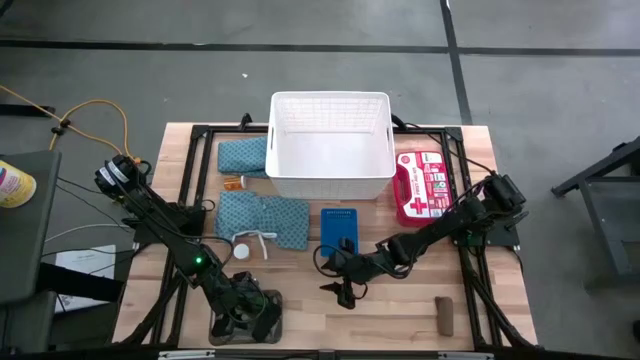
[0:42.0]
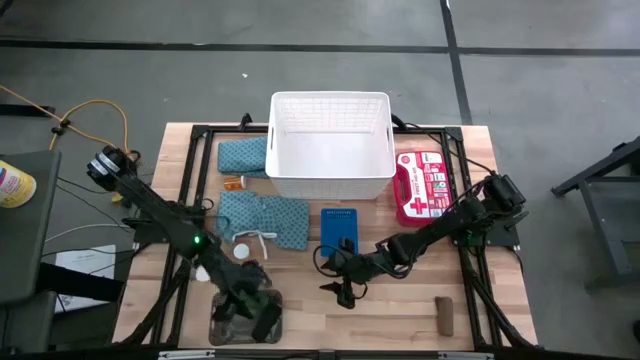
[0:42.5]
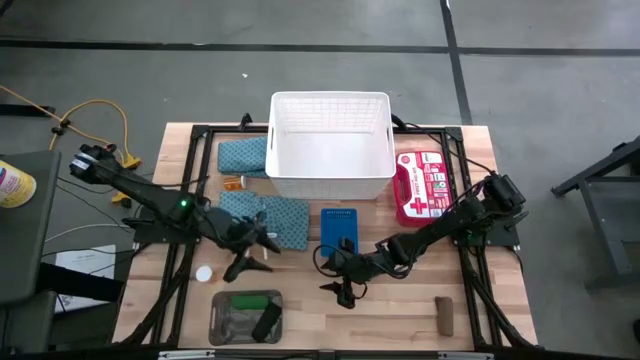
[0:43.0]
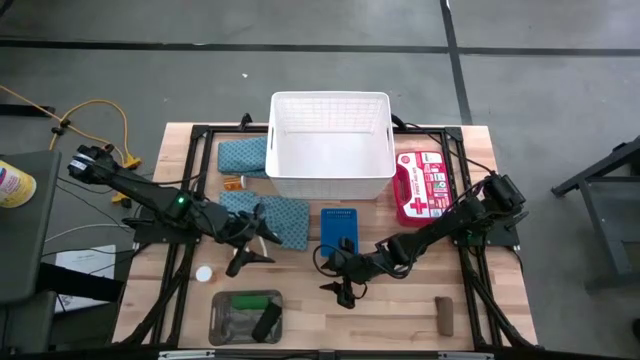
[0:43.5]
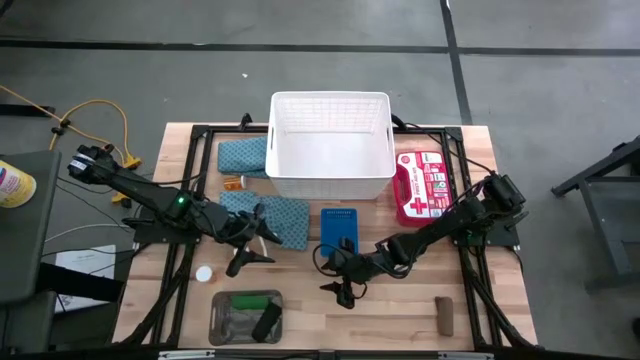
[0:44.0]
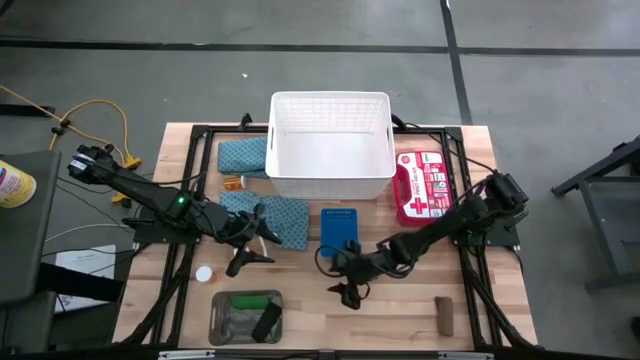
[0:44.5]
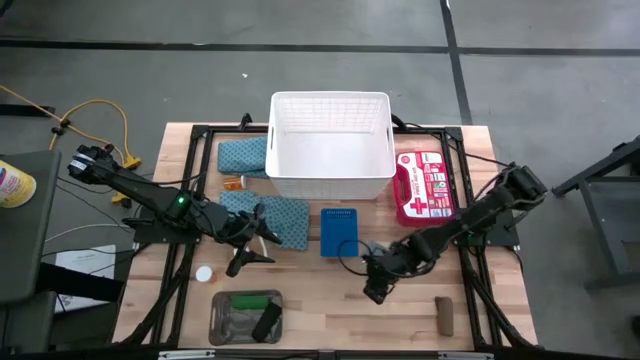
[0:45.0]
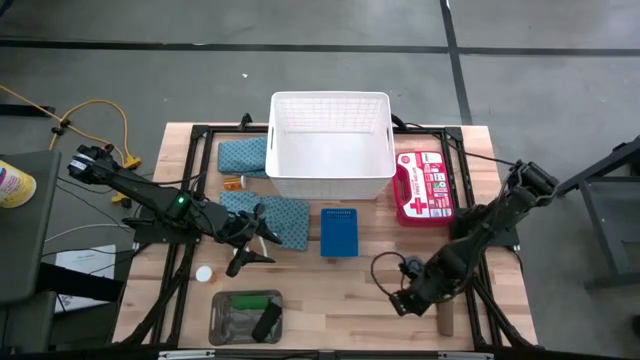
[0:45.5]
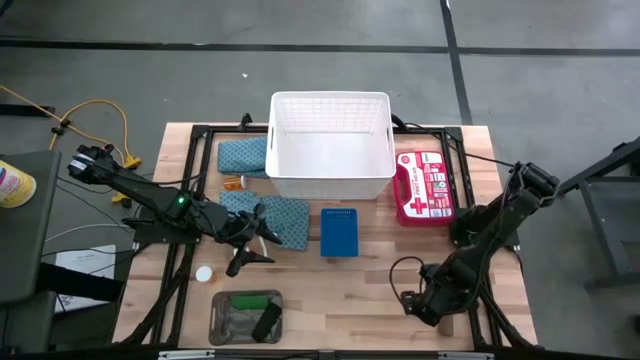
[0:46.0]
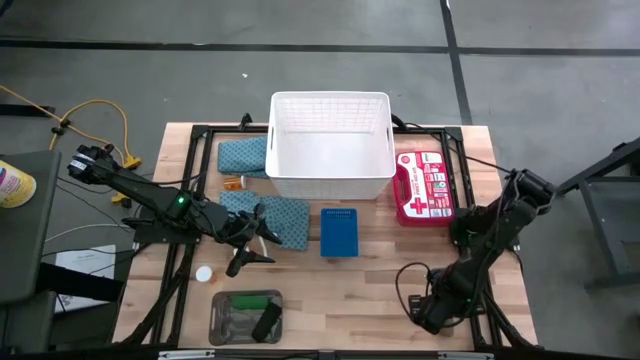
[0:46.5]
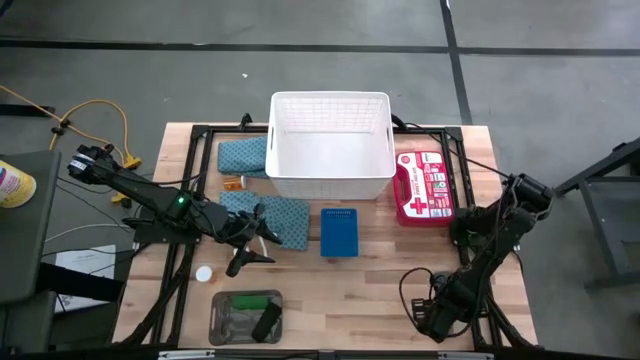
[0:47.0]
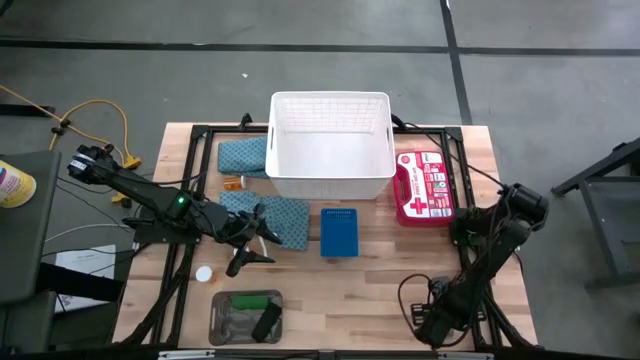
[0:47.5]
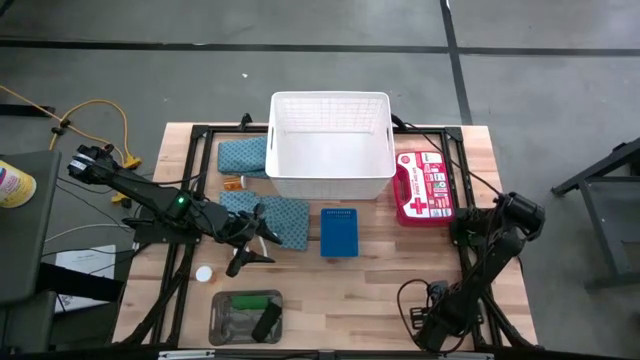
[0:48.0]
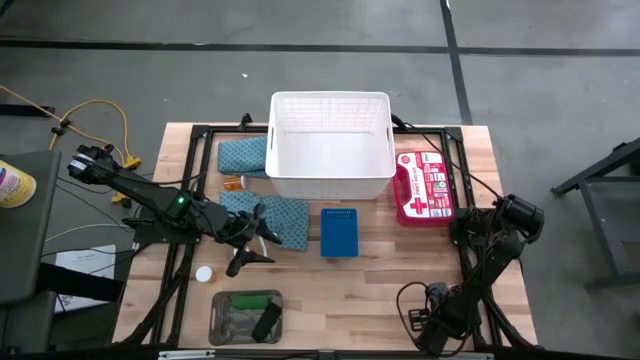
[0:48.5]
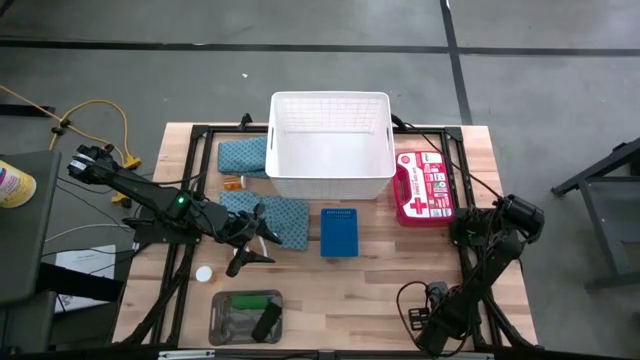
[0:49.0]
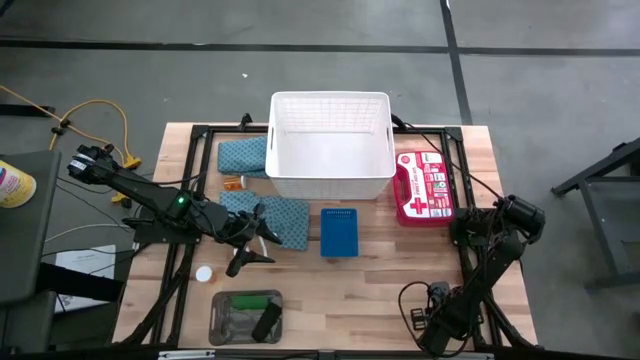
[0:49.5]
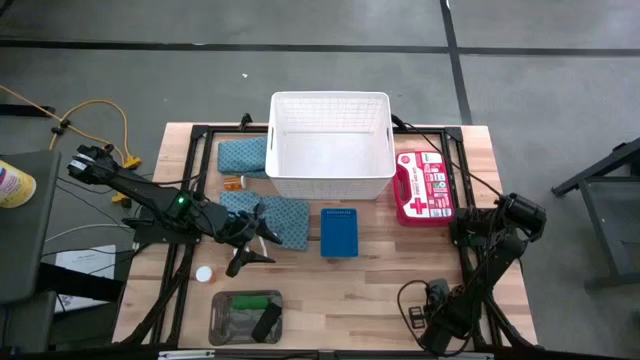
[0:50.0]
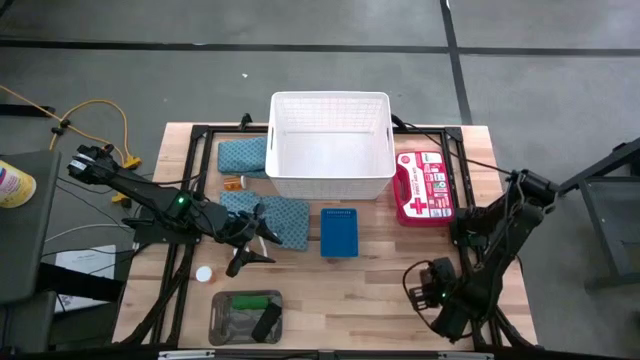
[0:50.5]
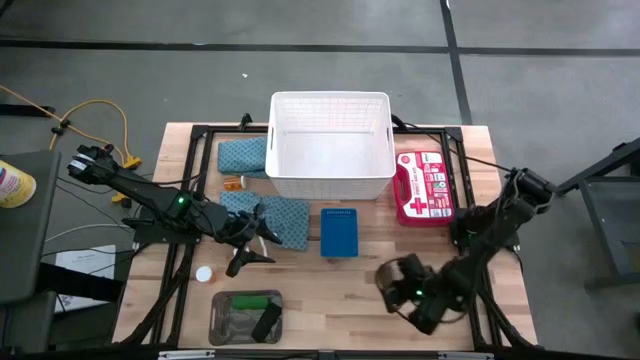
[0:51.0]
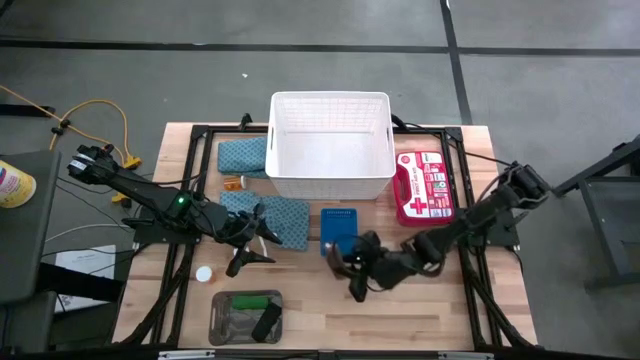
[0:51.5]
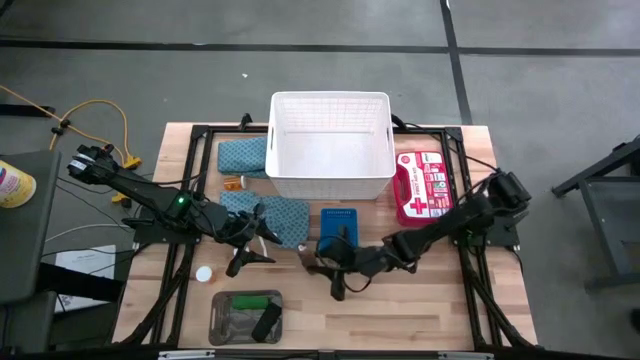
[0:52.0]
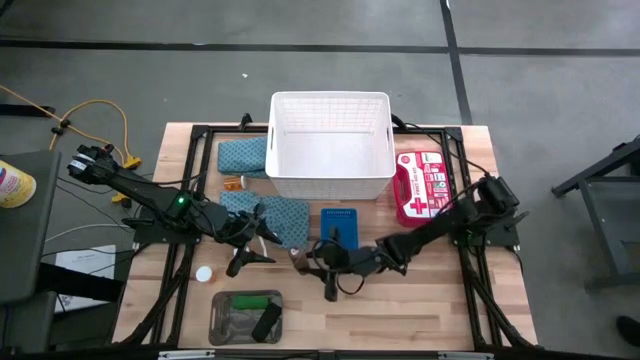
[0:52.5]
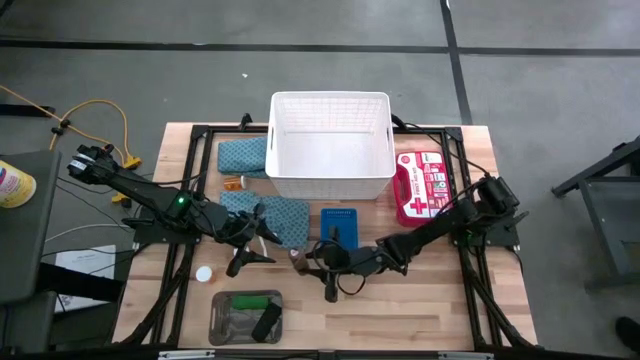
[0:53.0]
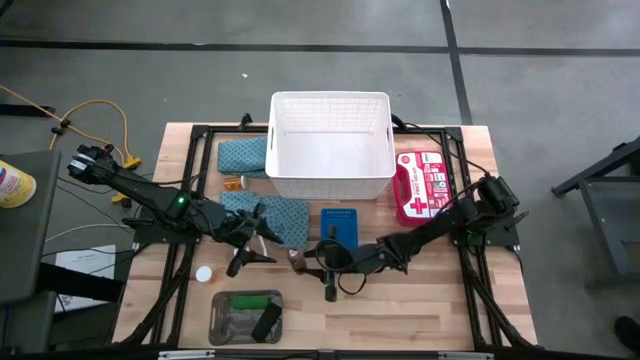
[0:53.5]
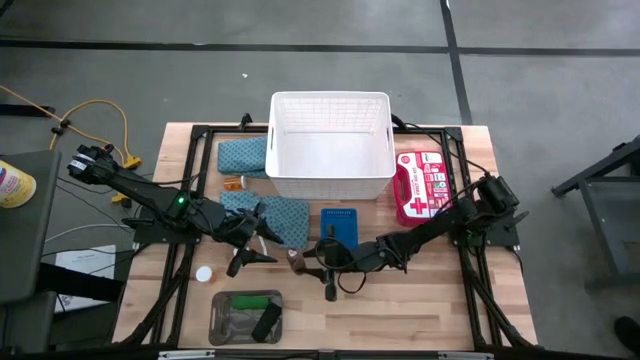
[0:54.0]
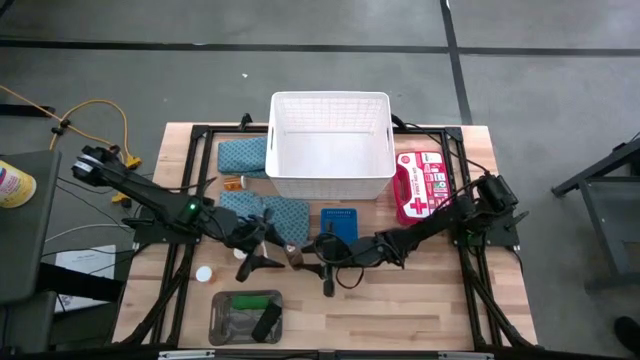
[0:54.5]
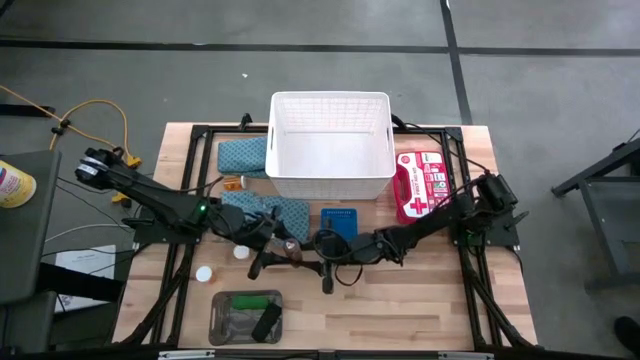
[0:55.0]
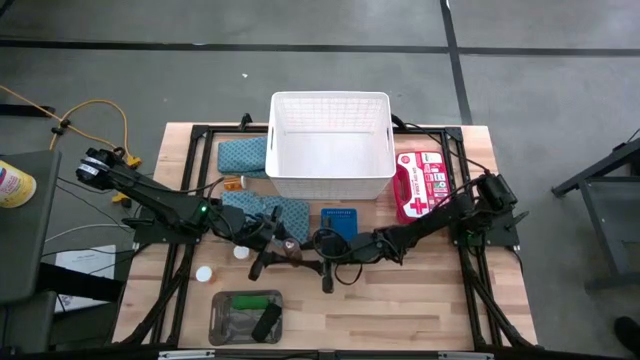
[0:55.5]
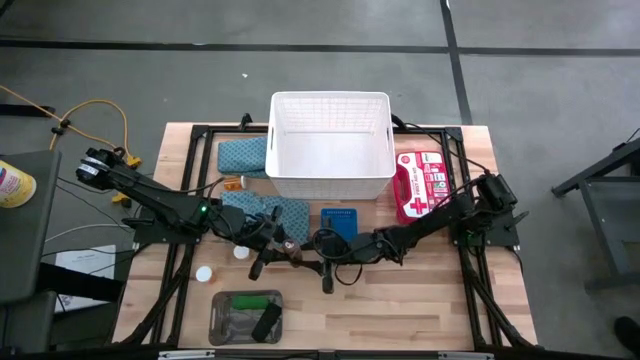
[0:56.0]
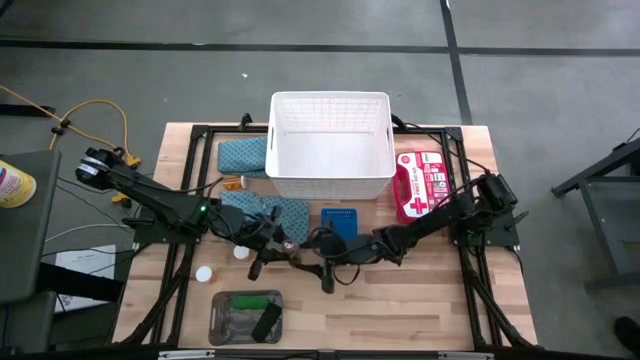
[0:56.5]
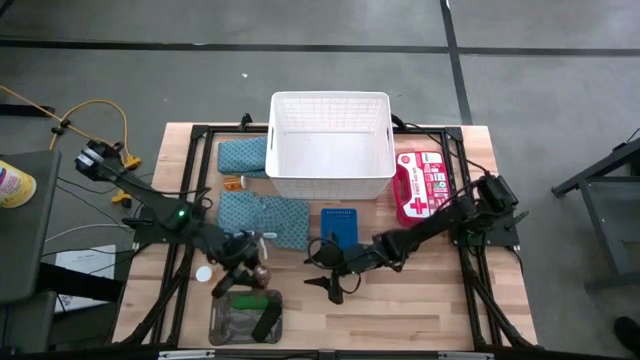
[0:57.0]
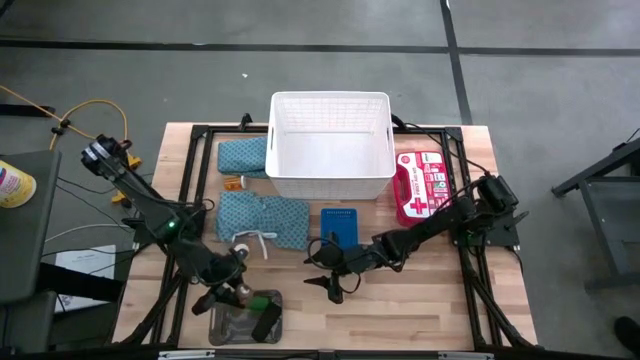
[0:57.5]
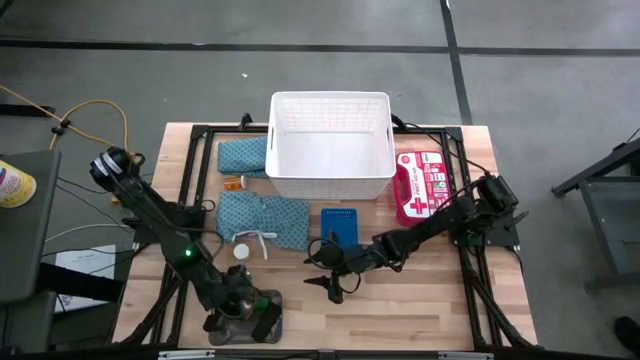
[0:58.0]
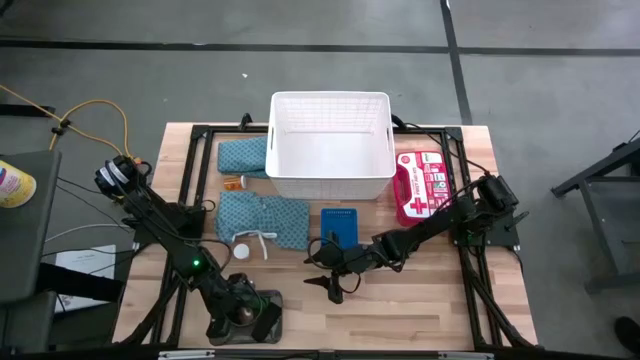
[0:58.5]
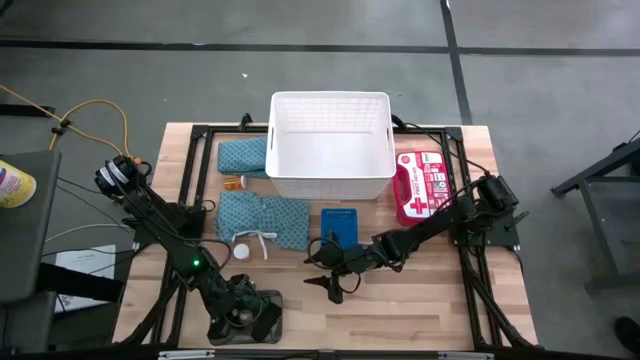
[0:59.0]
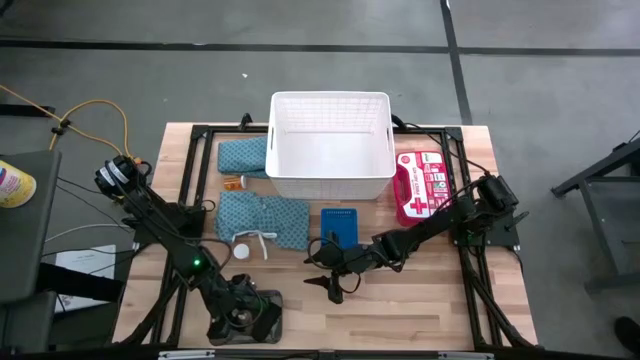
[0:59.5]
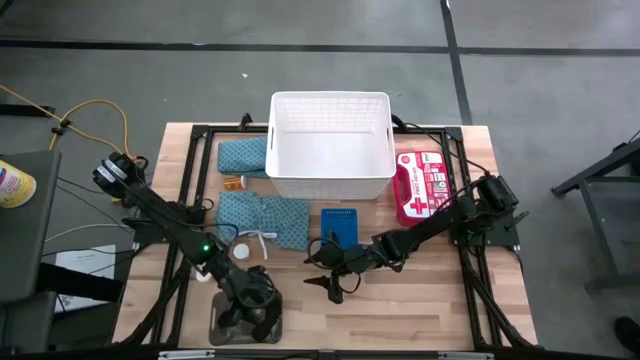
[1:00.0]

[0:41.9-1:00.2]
Task: Pick & place medical supplies in basket/bin
Put the brown bandage into the transparent black bin

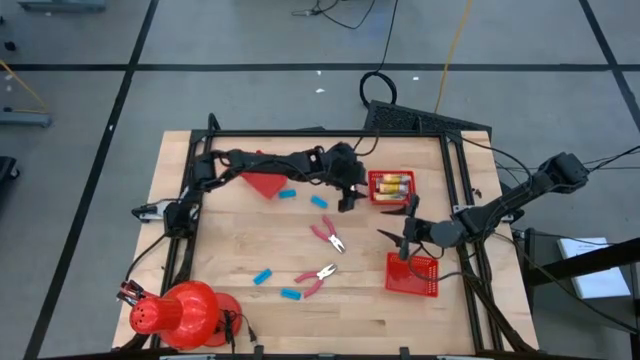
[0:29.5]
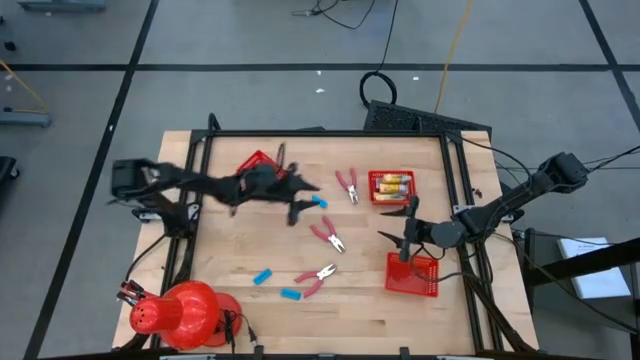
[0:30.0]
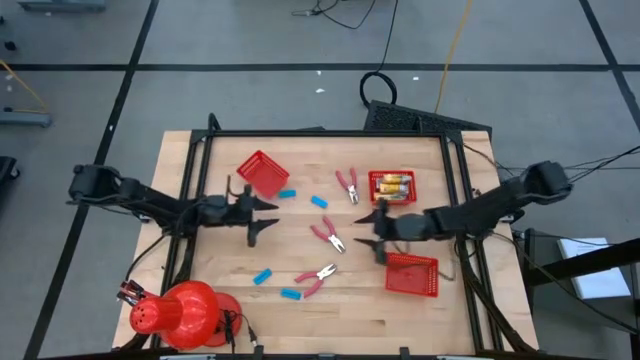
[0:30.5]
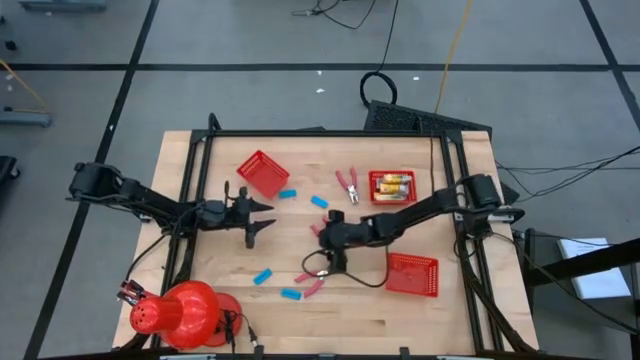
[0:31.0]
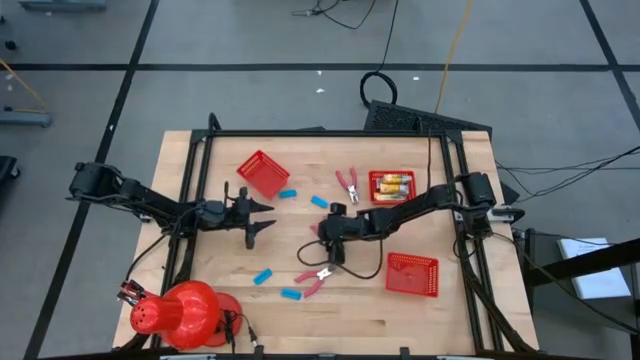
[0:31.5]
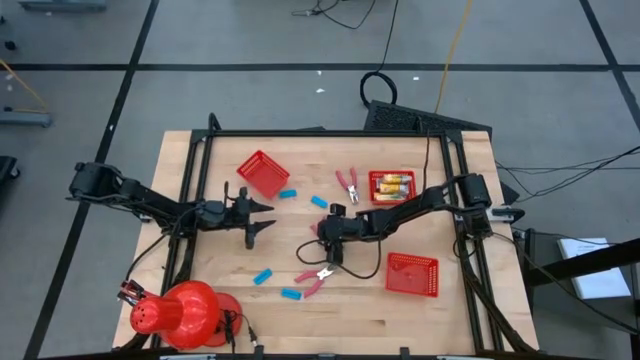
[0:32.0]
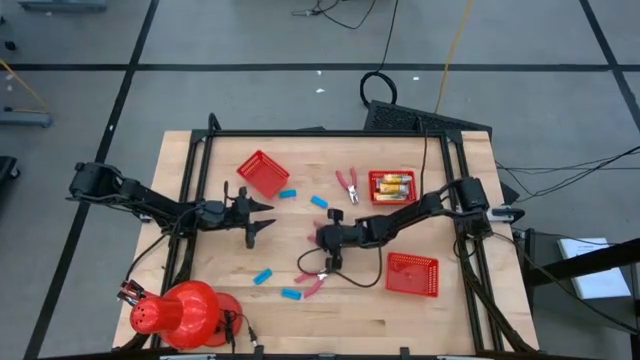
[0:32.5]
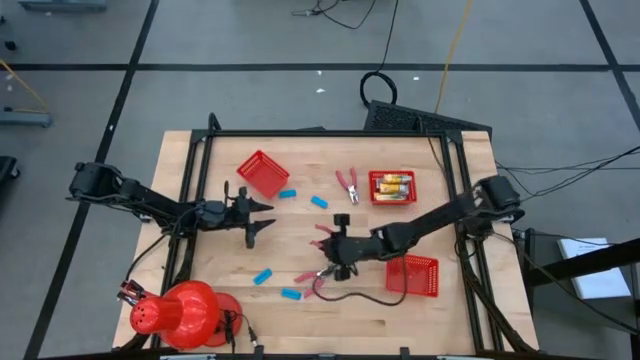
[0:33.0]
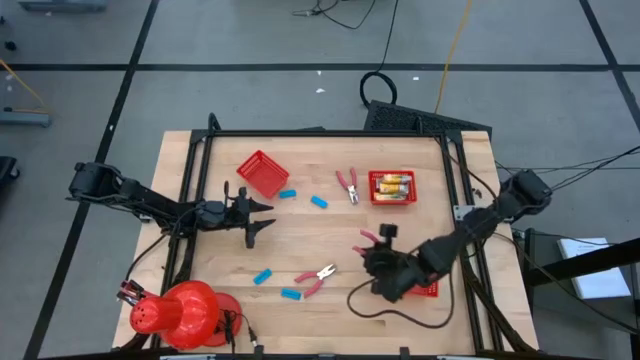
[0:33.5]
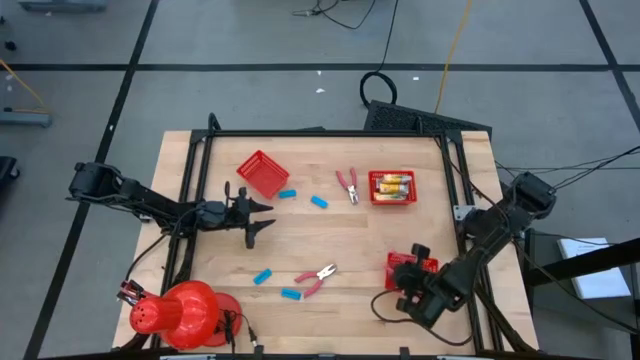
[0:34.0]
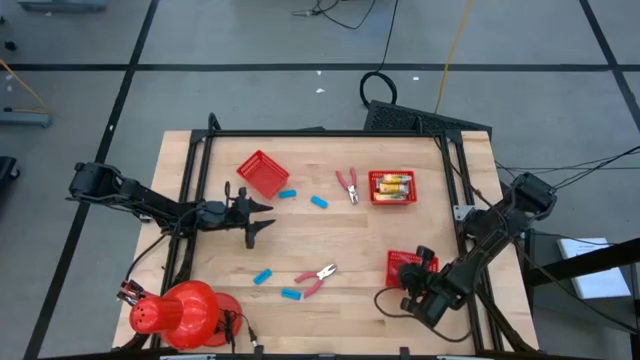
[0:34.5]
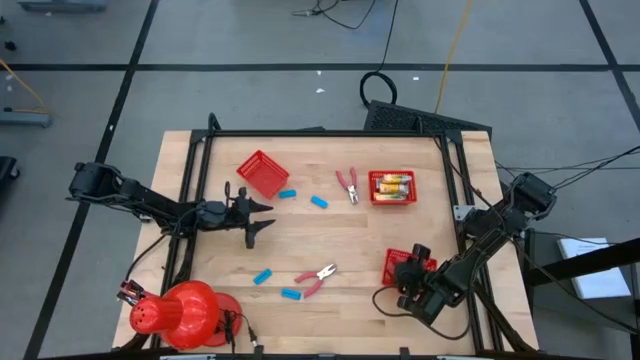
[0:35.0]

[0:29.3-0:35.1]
Task: Pick & Place School Supplies
Put the center pink hole puncher into the bottom red bin
